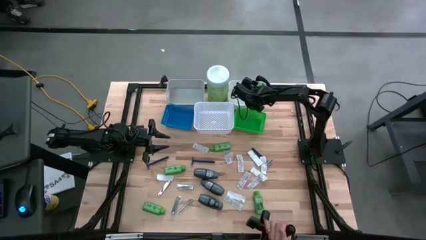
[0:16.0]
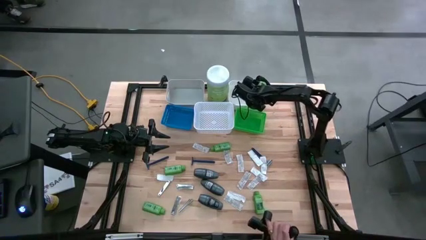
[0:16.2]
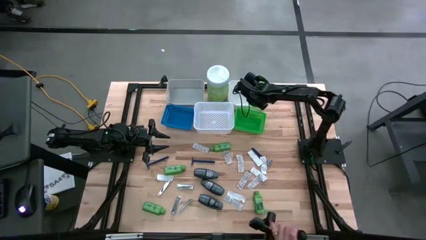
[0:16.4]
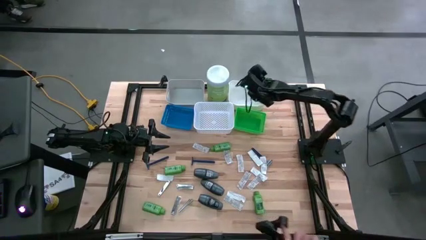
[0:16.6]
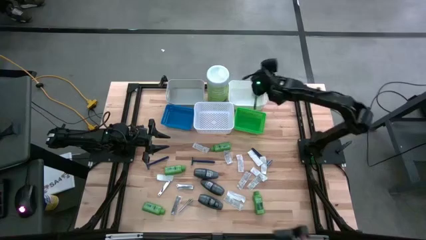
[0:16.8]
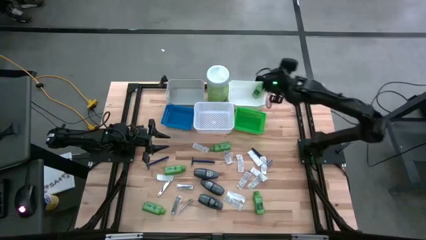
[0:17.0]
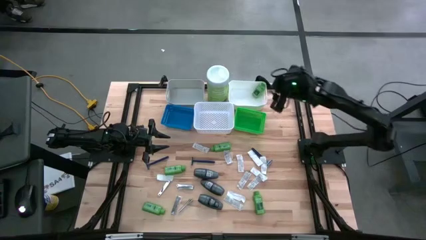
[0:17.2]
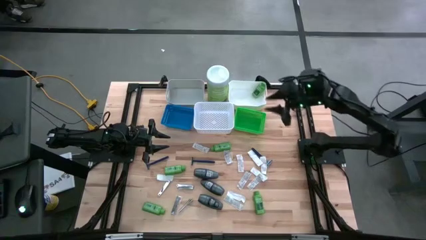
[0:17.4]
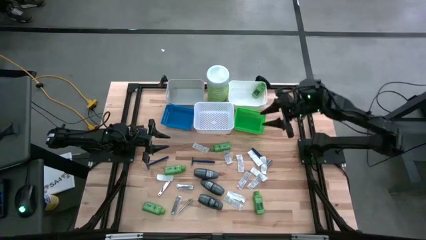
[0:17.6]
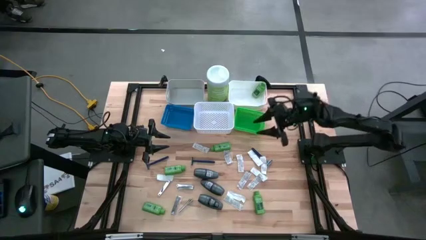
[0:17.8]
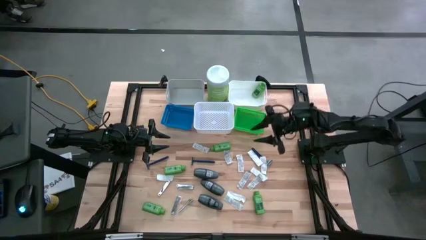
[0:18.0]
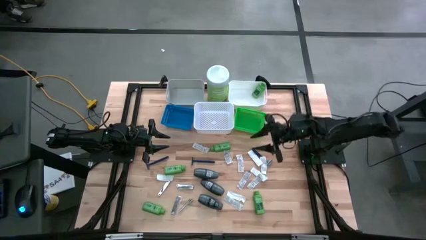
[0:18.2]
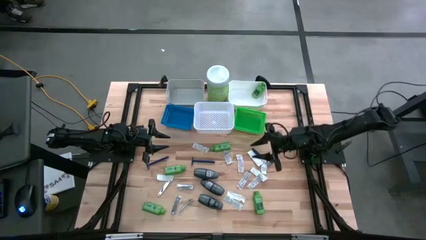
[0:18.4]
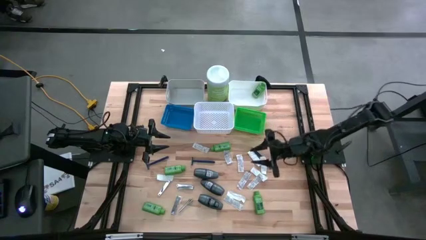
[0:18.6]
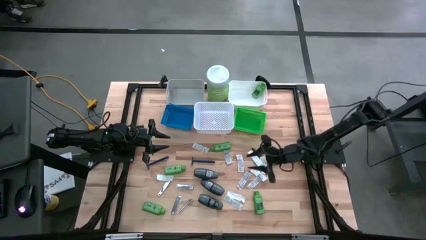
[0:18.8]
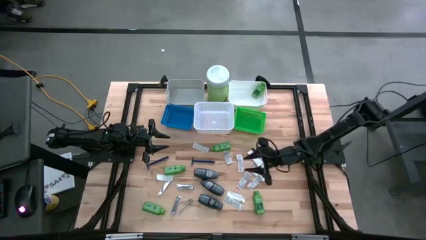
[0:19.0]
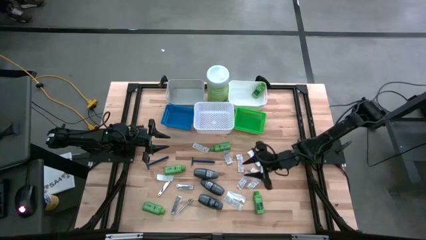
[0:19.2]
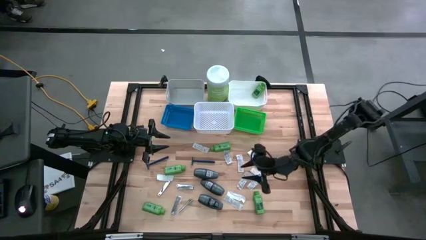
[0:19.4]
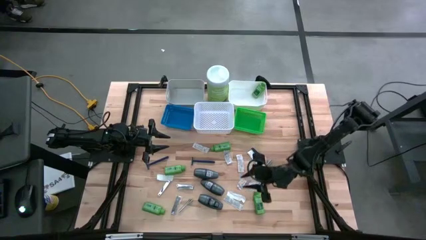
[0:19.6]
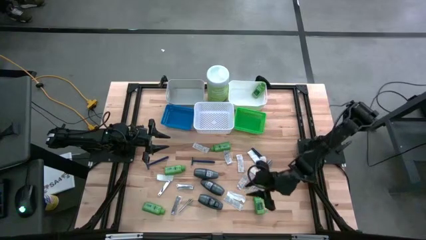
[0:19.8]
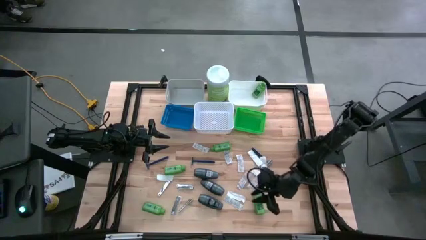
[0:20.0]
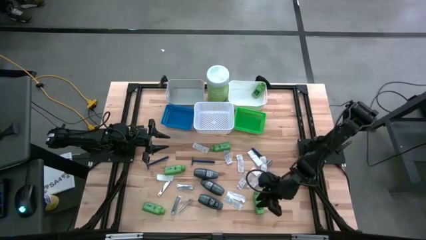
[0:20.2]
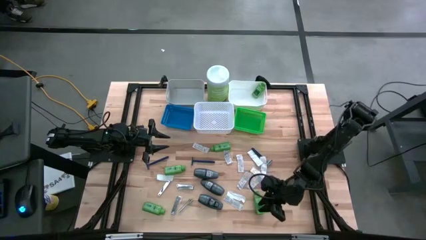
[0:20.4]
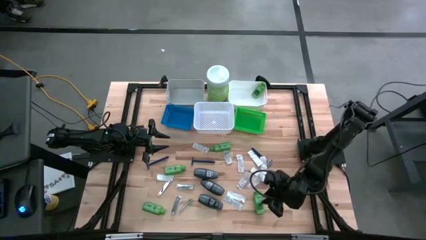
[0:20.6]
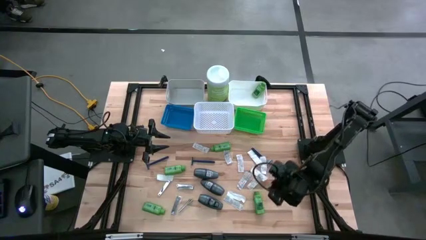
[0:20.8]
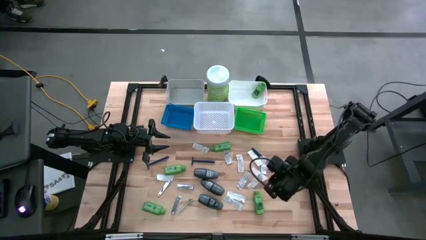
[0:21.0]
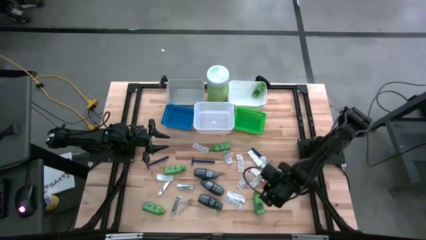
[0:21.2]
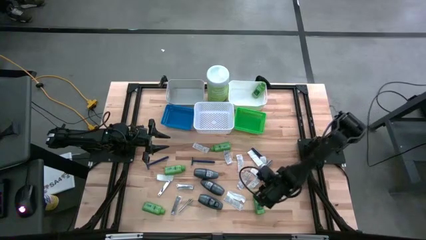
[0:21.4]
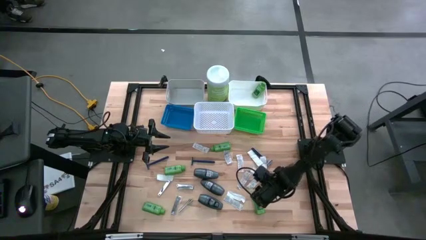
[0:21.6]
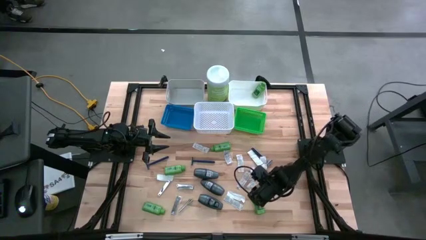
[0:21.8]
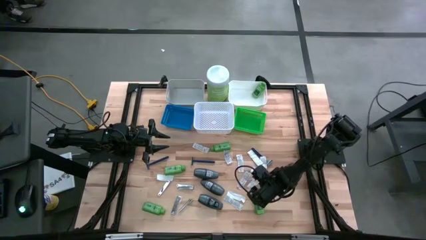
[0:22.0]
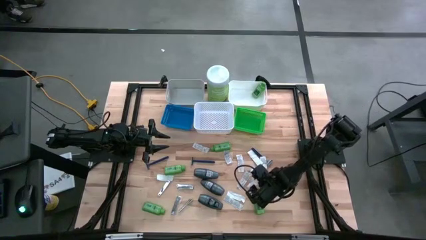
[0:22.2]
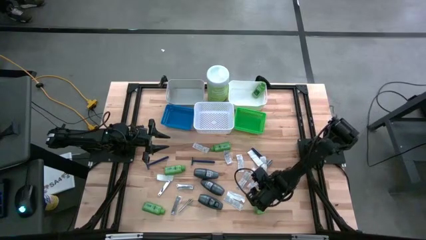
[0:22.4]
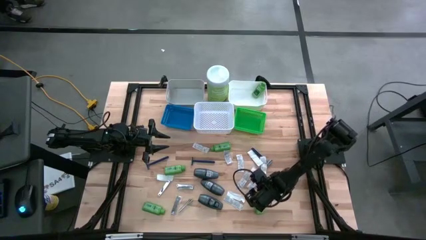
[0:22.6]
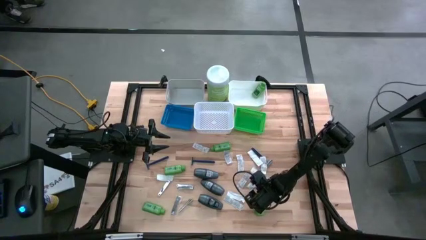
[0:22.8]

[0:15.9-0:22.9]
Task: Pick & Place Travel size toiletries
Put the green shampoo into the small white bin

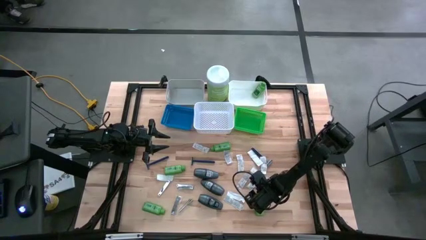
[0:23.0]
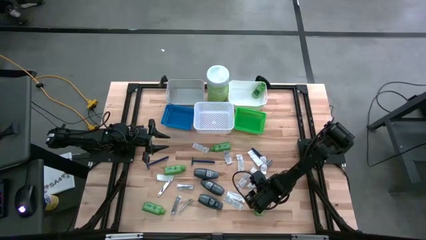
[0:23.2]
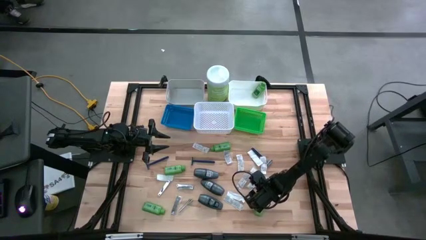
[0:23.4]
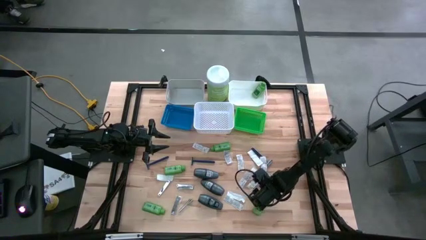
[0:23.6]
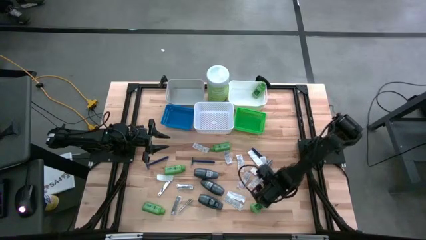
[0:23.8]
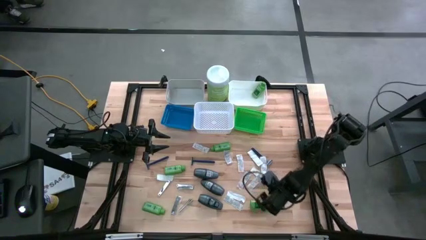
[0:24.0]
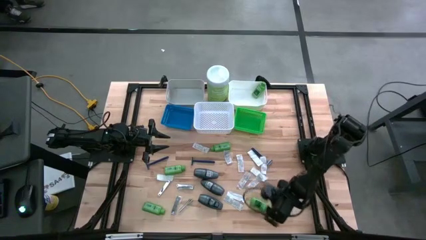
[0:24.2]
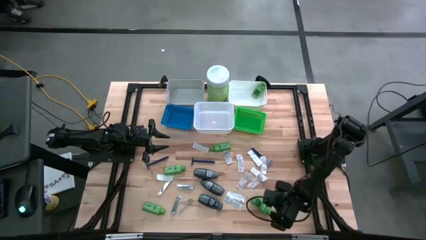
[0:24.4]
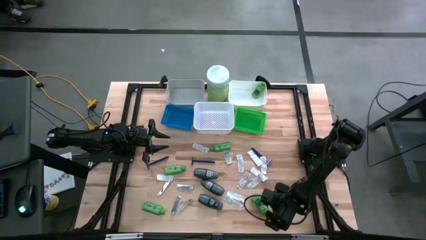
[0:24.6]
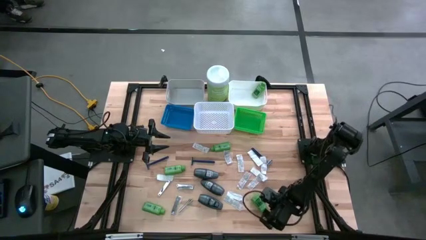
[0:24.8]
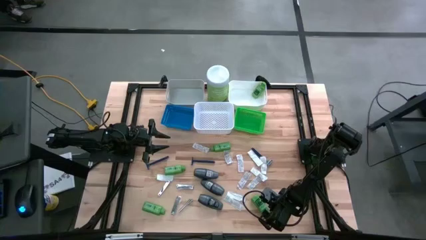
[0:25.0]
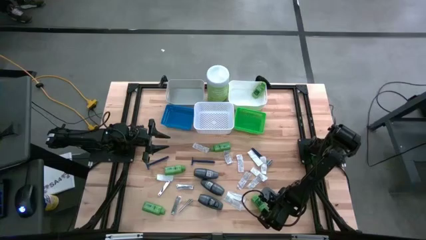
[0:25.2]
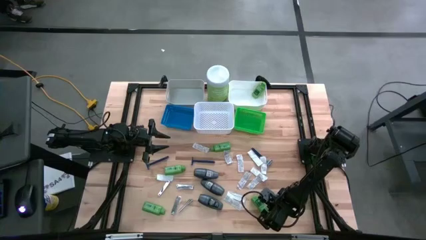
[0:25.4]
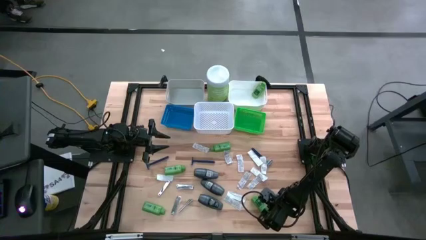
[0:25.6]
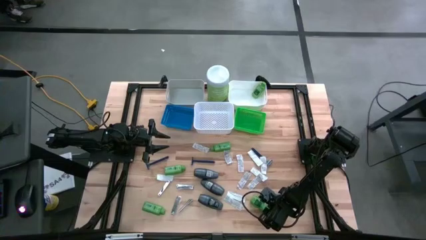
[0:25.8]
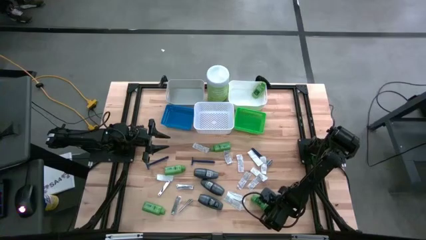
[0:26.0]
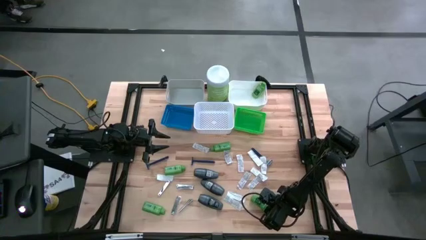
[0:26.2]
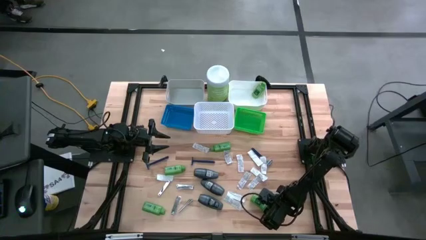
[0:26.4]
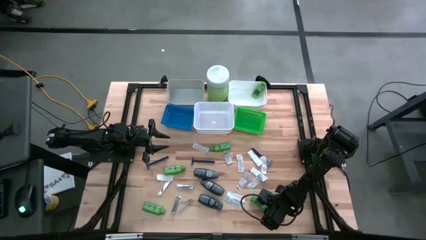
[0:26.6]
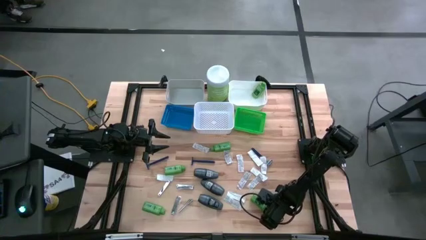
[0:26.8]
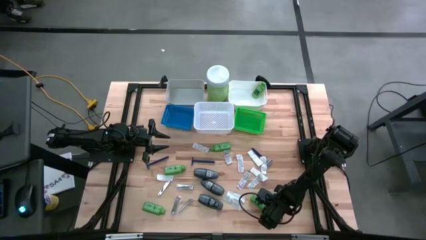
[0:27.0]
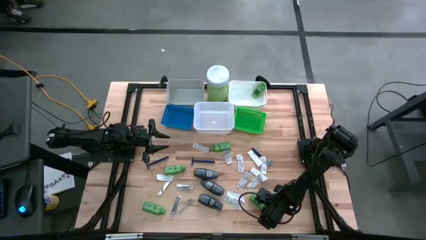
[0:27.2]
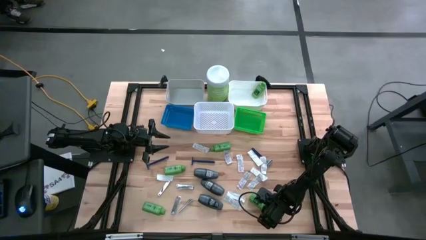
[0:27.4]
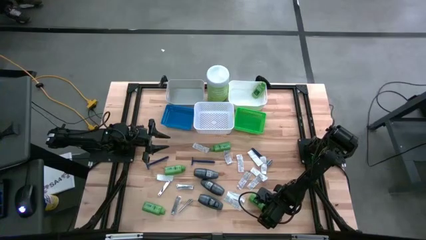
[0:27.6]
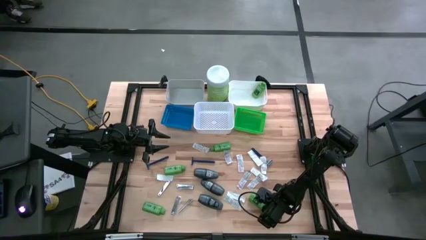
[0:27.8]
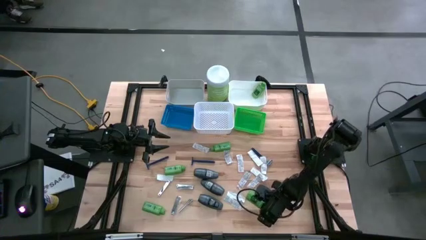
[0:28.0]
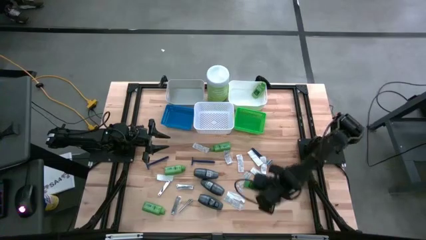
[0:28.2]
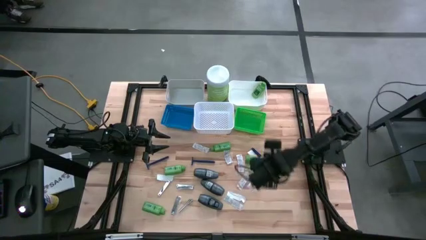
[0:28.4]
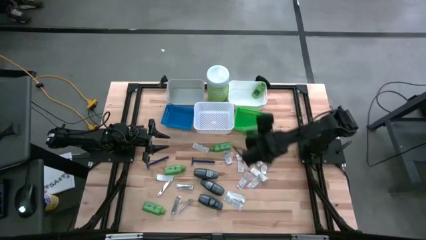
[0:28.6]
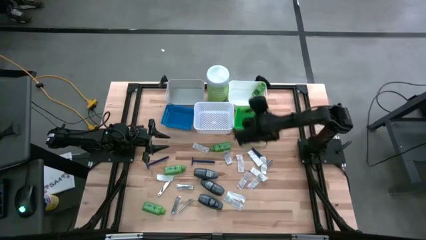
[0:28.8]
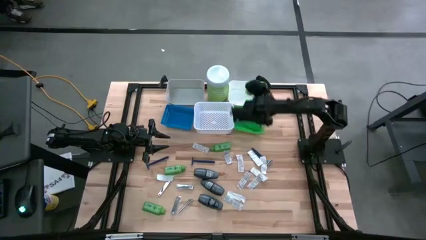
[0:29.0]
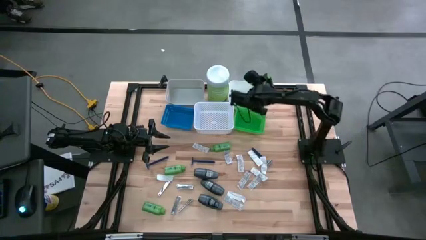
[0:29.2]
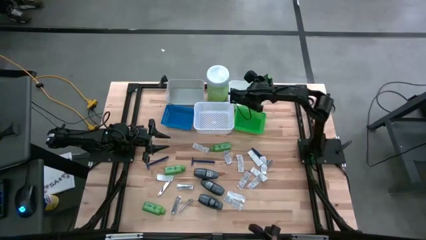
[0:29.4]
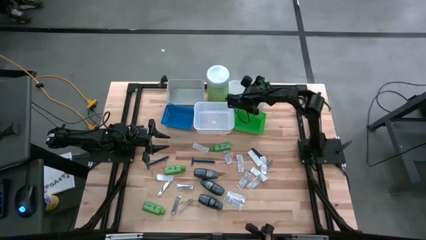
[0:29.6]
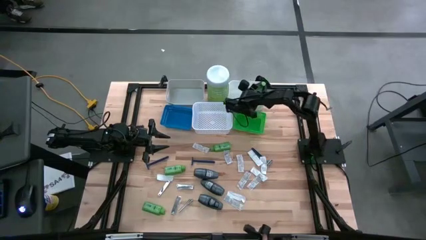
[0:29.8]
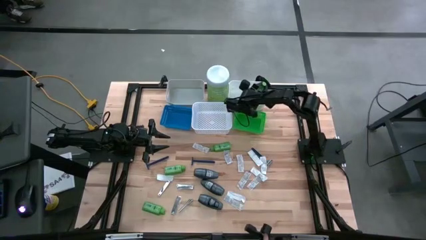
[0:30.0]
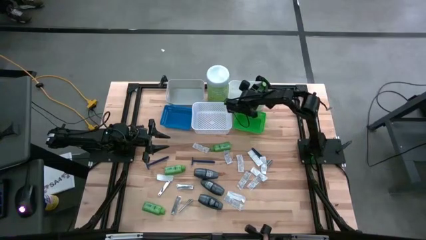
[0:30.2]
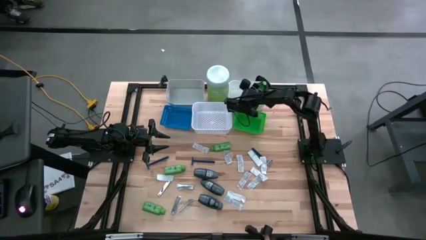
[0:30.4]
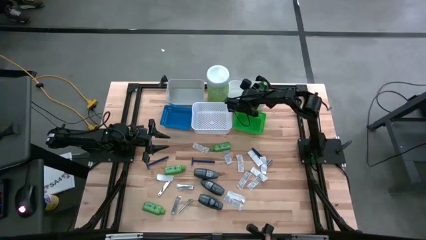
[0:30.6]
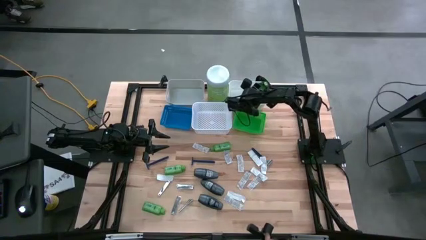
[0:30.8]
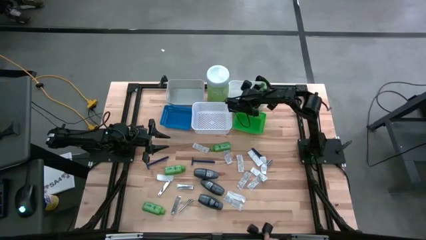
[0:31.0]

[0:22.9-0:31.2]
Put the green shampoo into the small white bin
